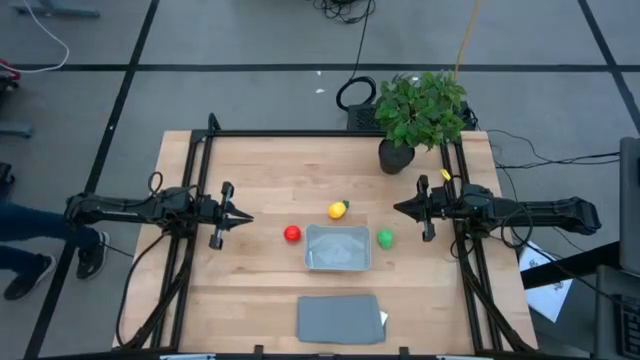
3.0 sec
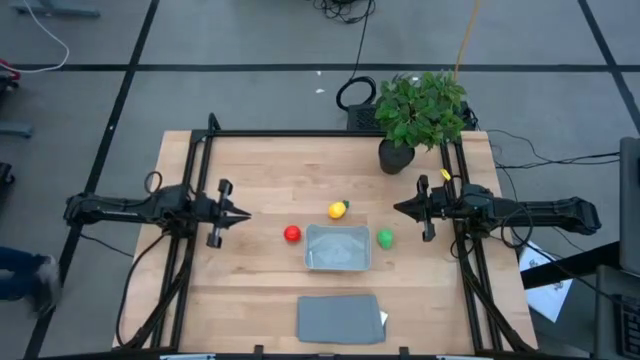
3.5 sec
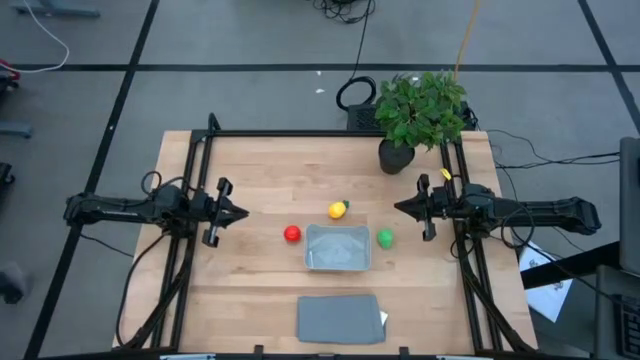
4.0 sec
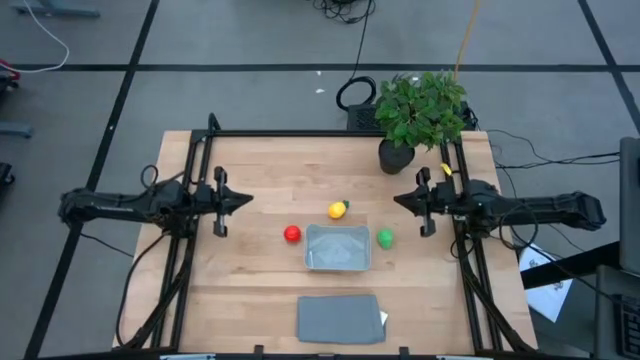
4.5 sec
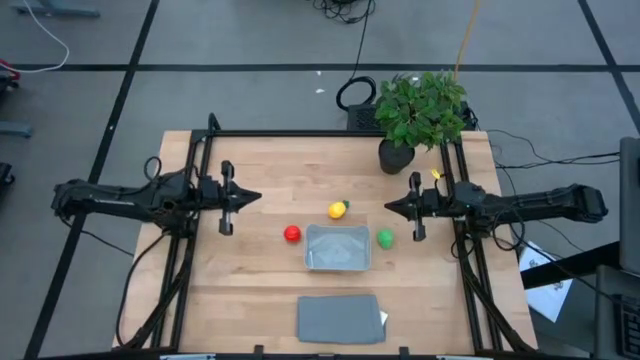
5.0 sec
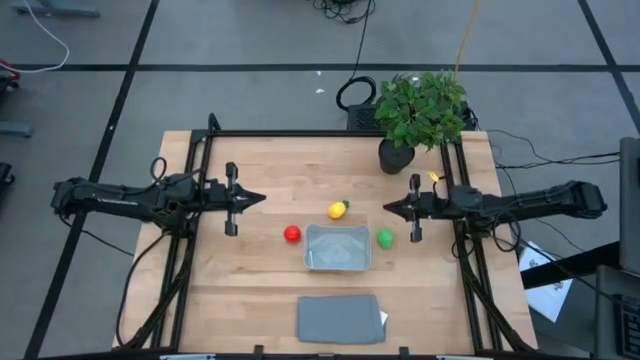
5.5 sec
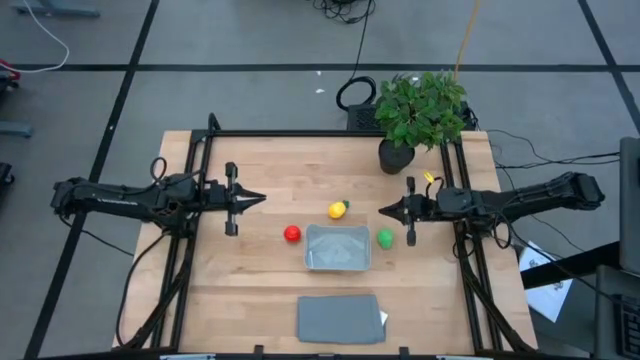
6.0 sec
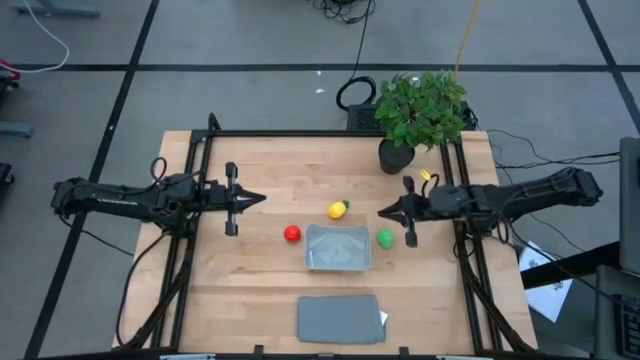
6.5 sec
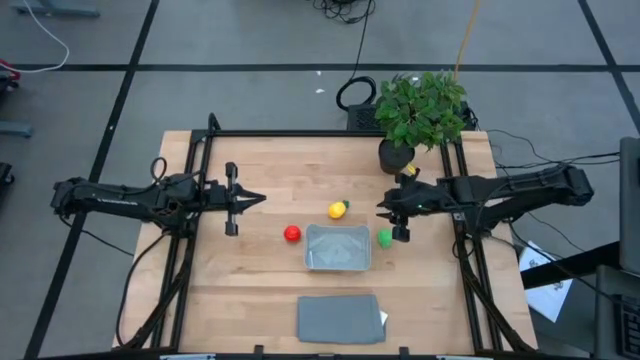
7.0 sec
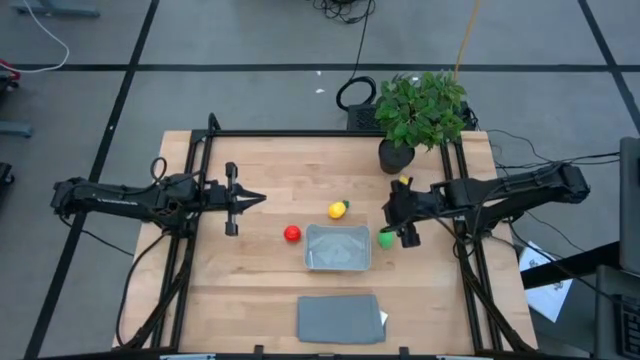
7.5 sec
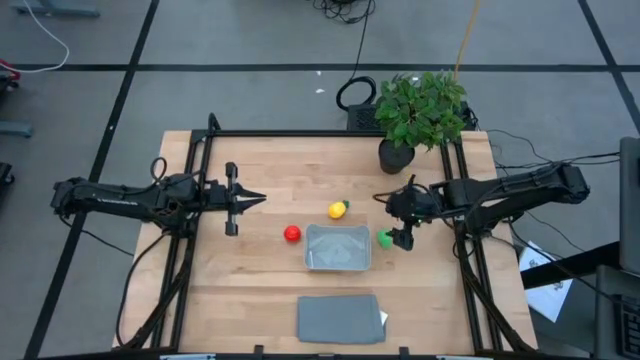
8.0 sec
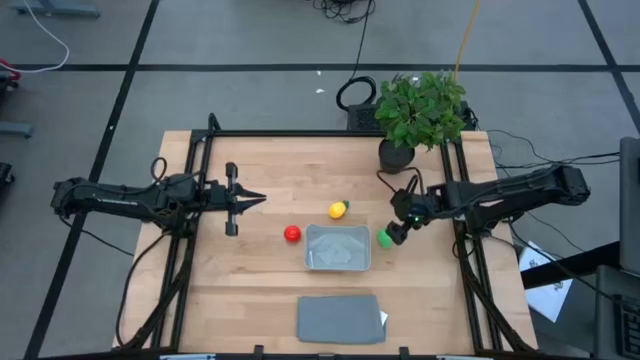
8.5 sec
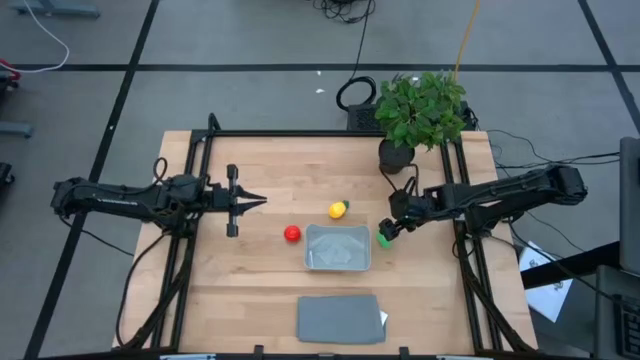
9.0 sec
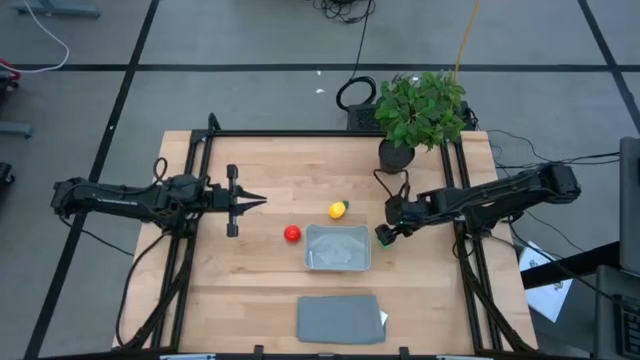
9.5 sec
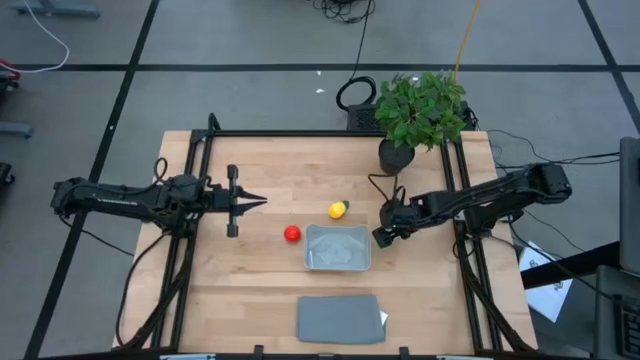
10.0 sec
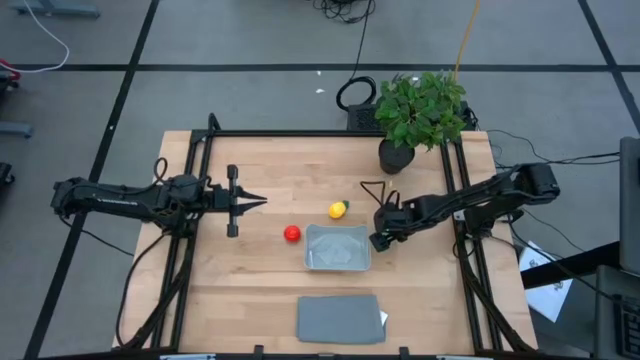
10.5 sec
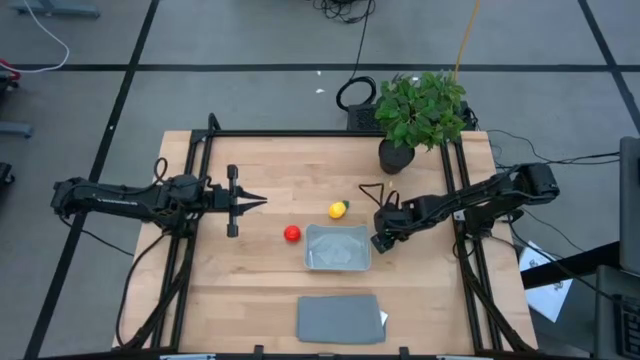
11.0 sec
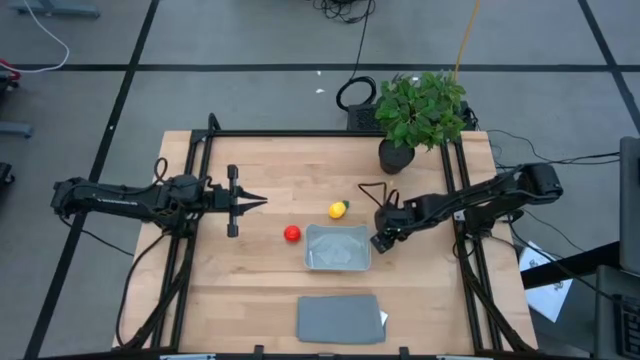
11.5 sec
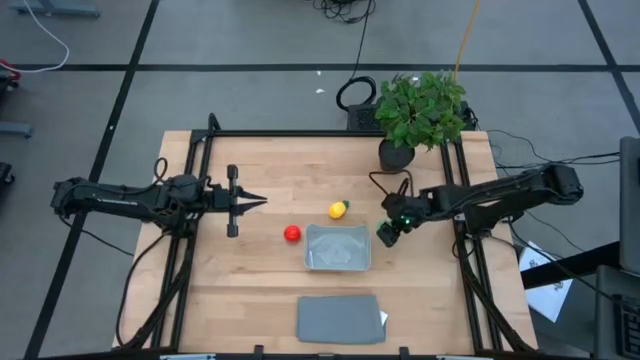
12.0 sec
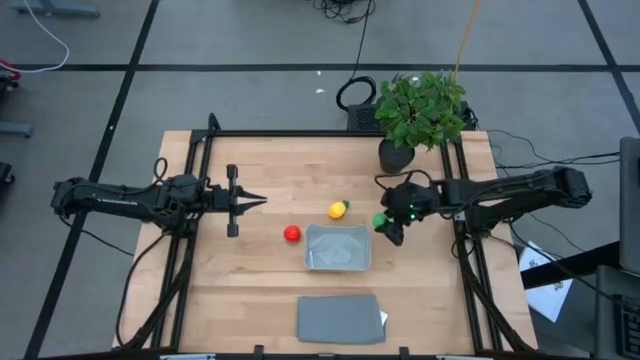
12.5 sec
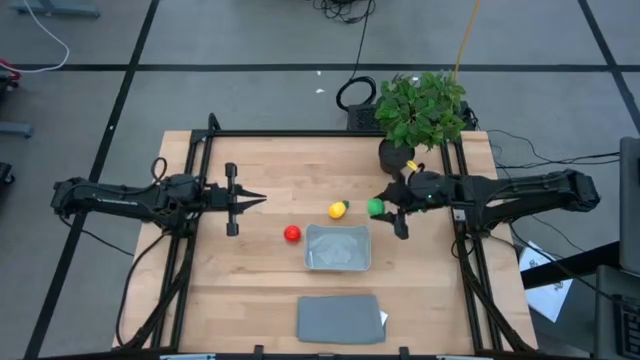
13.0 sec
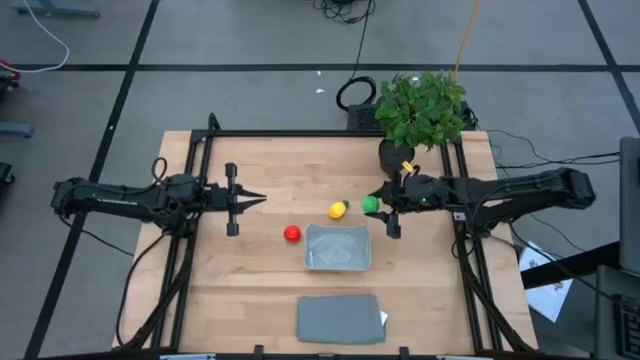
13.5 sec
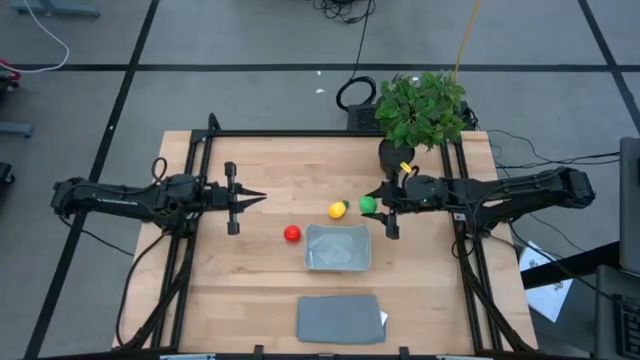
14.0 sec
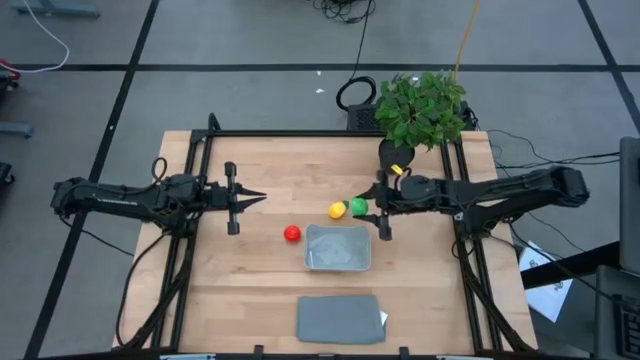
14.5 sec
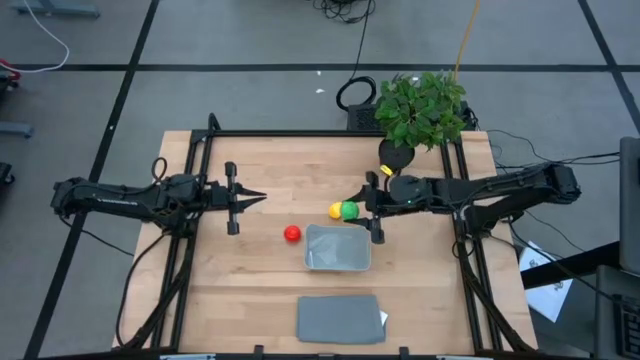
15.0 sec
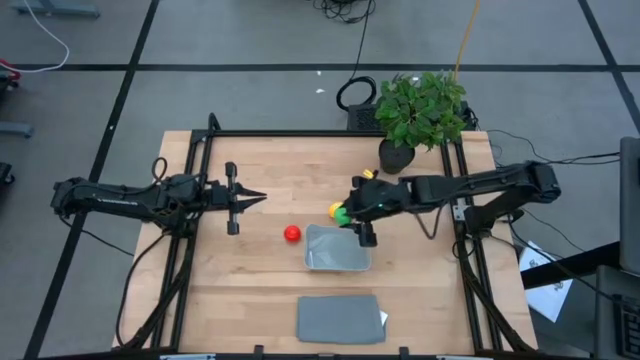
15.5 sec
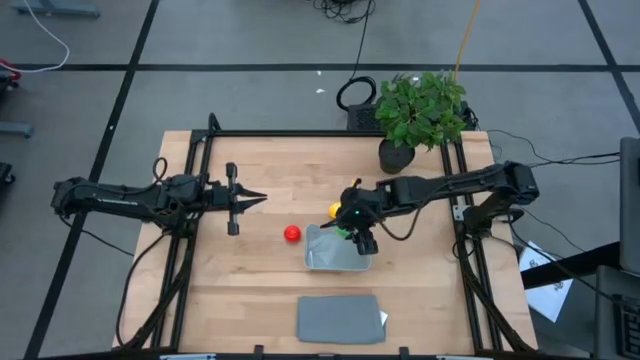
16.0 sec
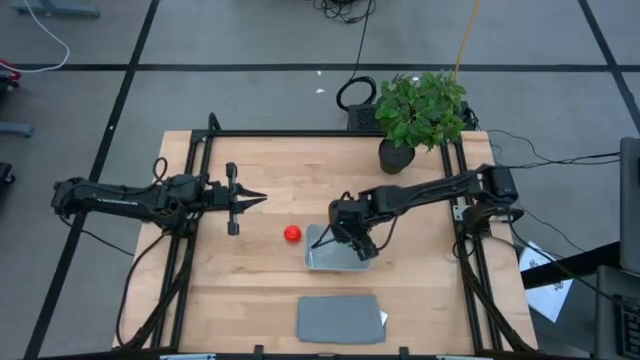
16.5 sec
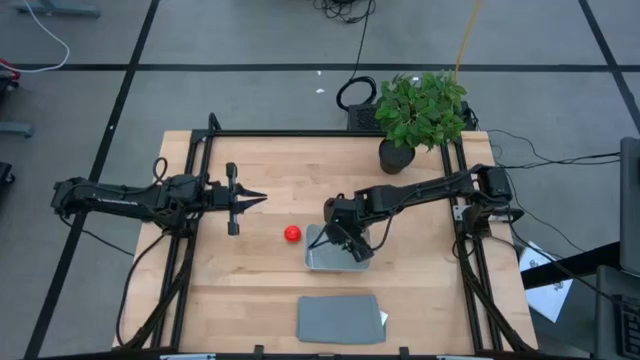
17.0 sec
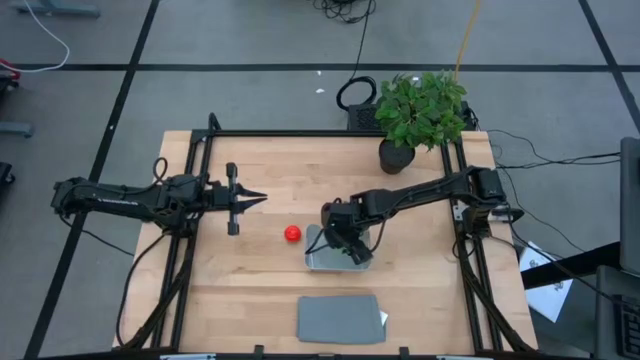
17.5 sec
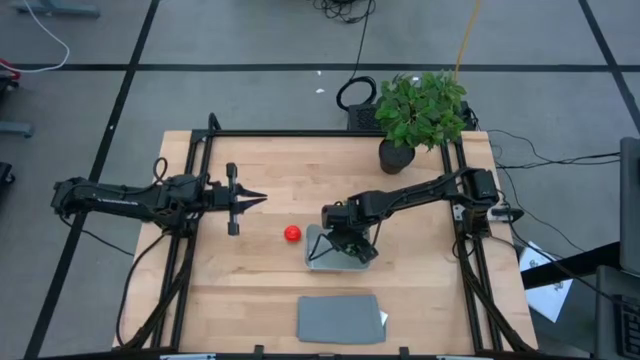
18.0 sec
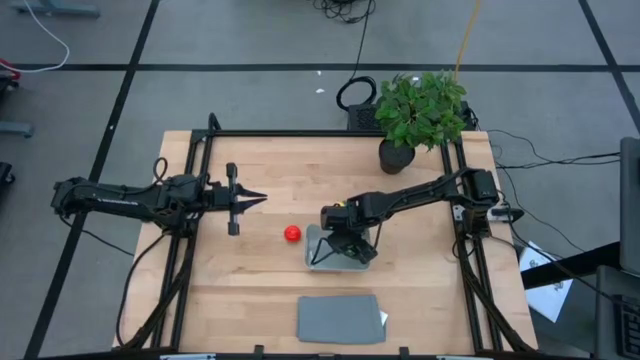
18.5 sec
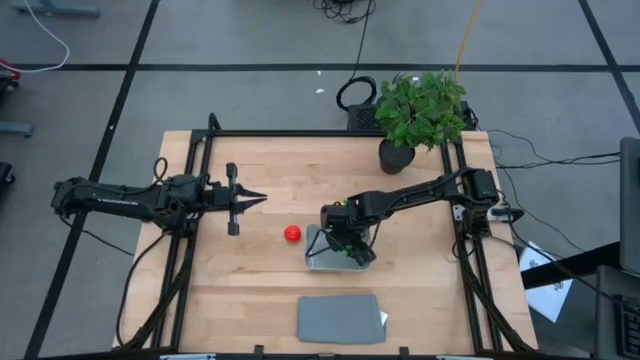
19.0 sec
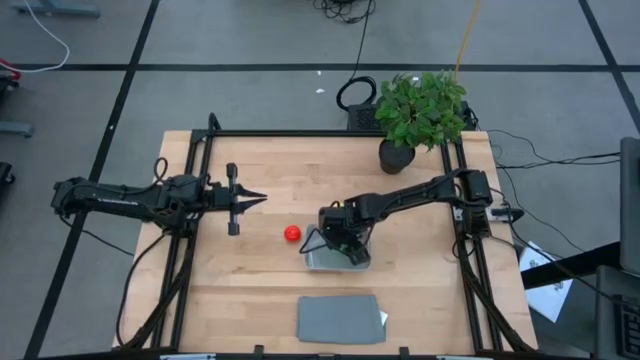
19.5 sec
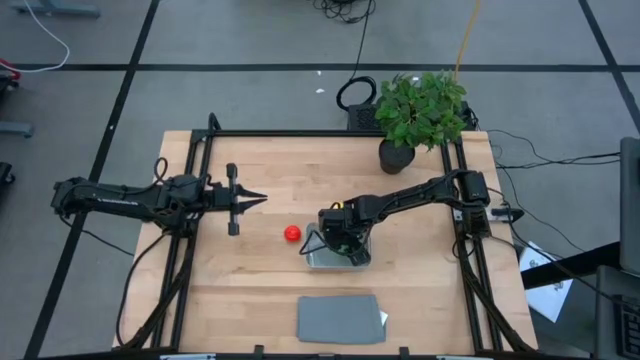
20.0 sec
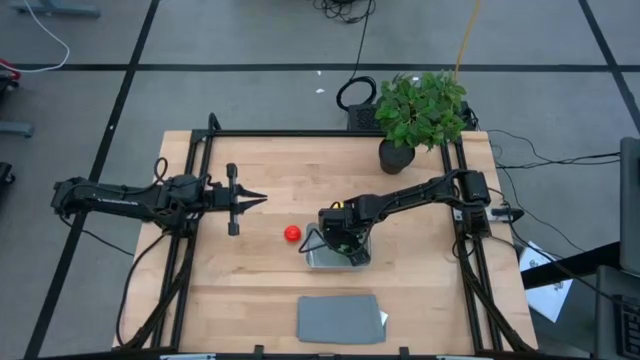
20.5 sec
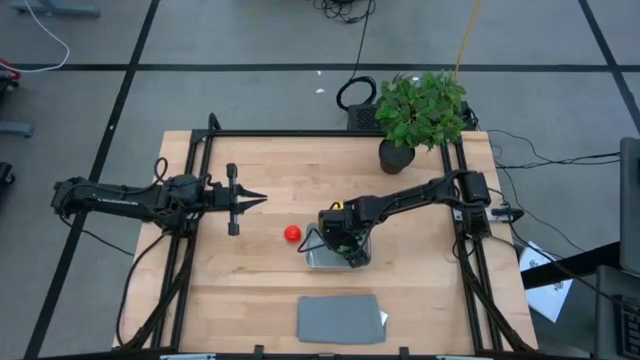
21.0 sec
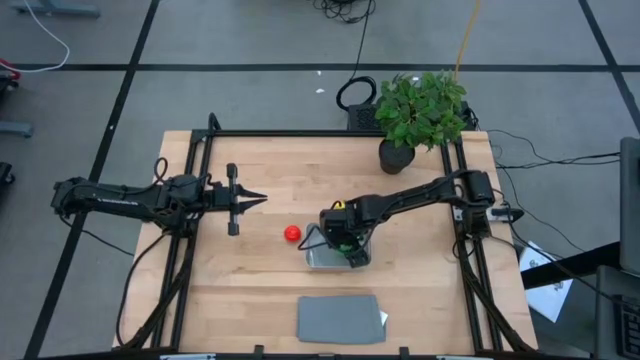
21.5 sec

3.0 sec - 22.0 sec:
Task: Pick and placing Produce into tupperware
Put the pear into the gray bin

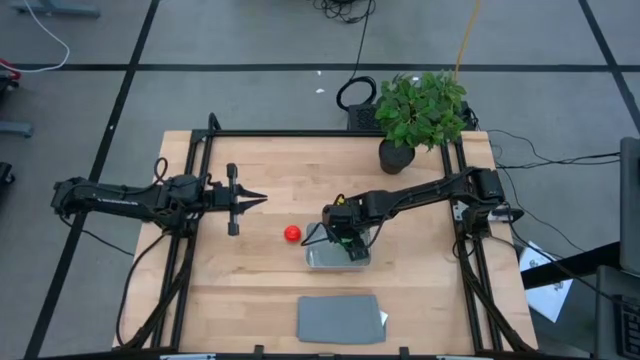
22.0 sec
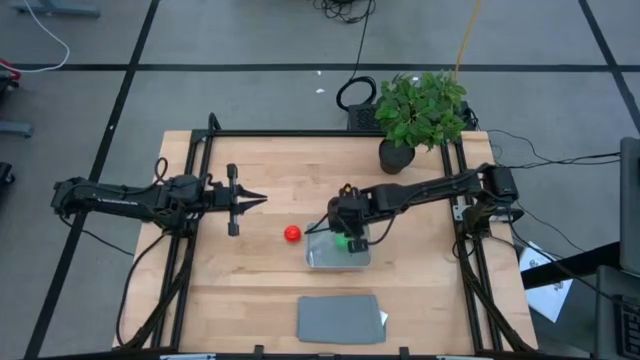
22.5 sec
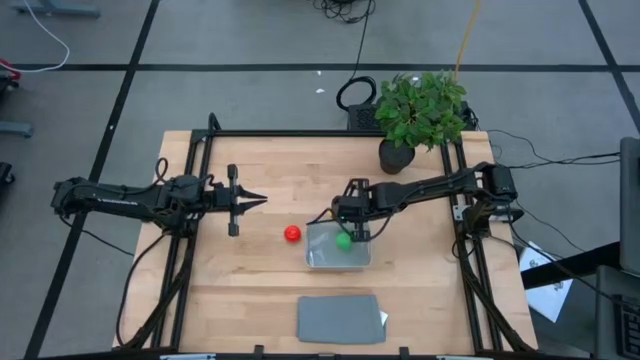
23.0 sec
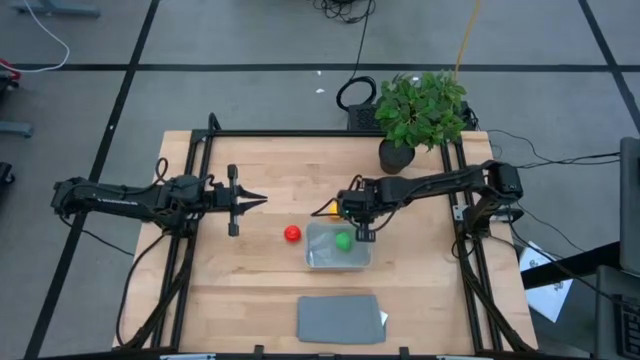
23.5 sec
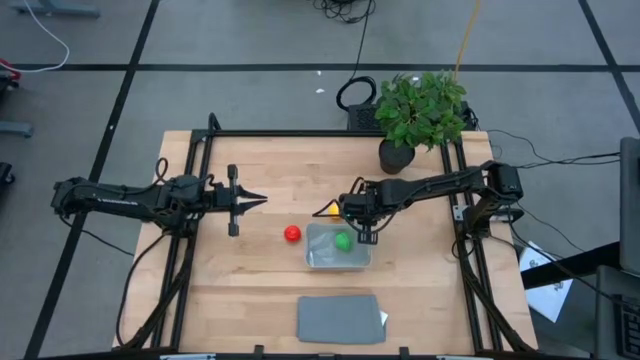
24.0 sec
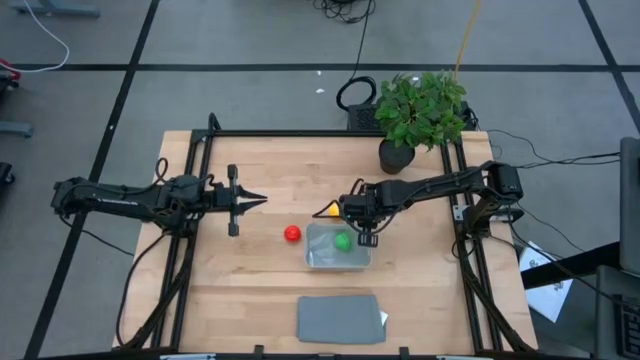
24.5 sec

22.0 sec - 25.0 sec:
Adjust the gray bin
